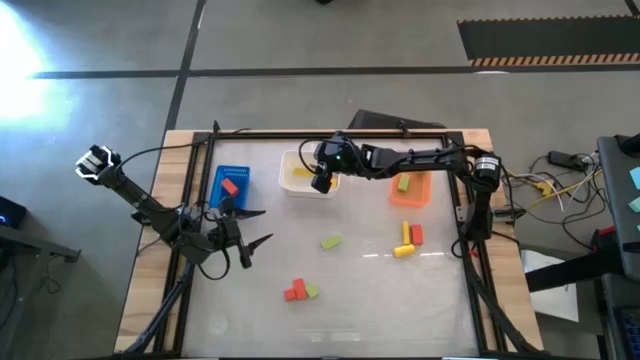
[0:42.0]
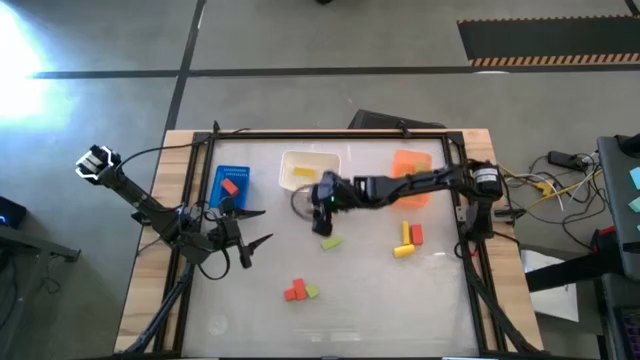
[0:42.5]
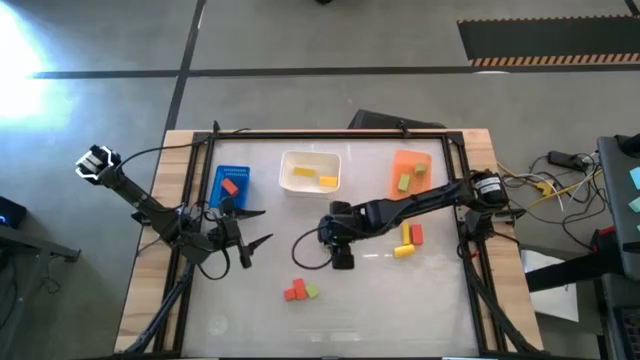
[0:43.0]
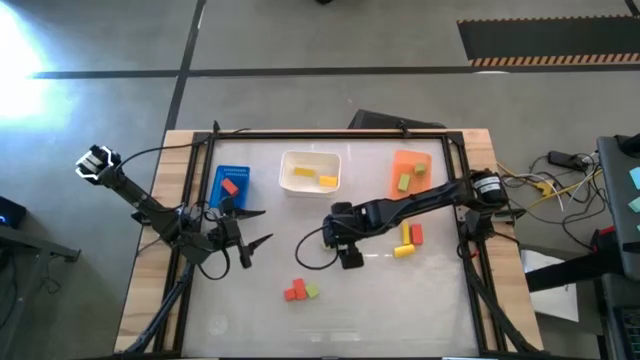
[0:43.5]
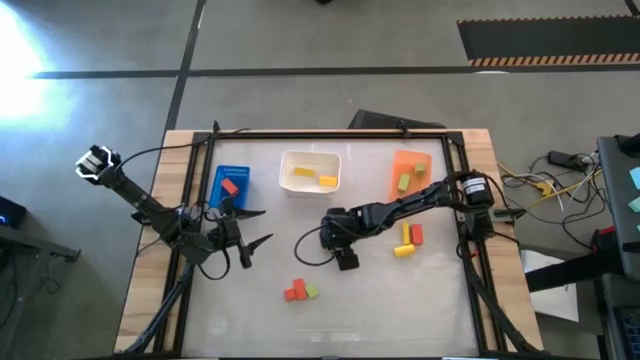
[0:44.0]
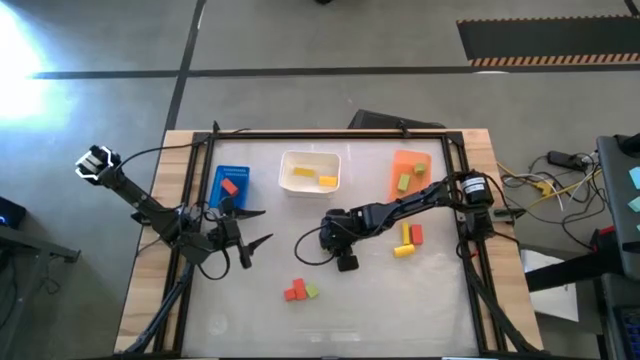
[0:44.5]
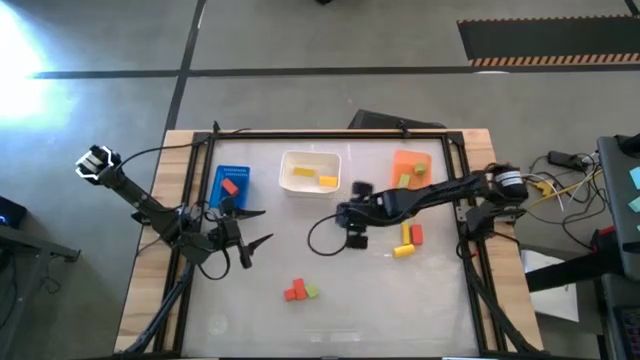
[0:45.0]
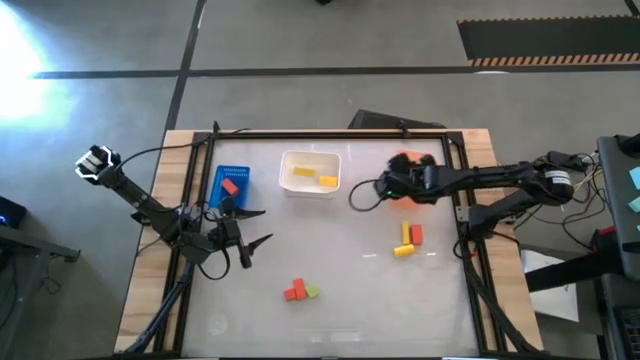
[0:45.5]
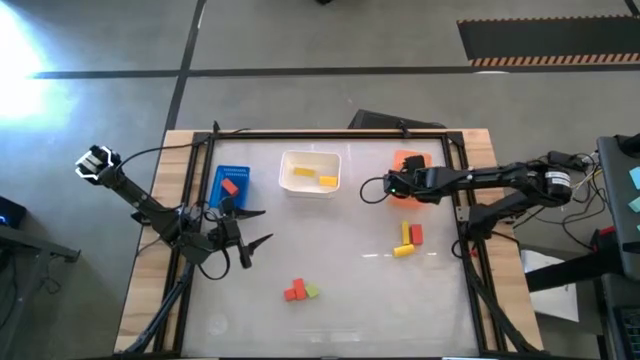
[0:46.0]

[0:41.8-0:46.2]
Task: Sort & place blocks by color
Put the top green block into the orange bin

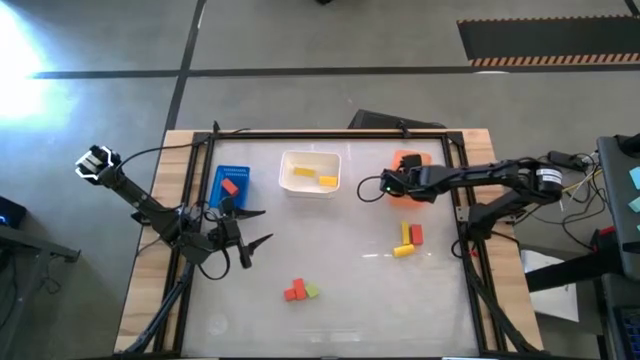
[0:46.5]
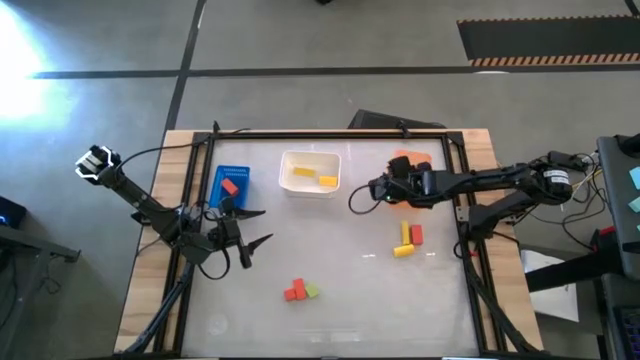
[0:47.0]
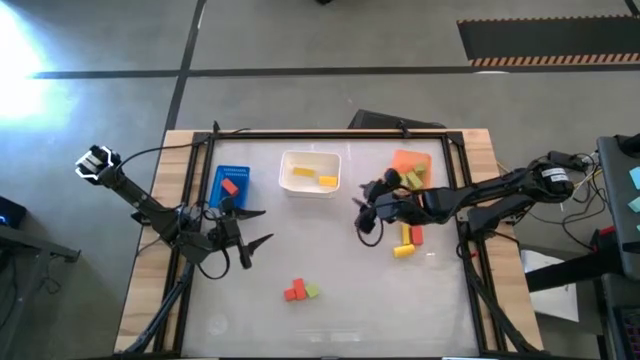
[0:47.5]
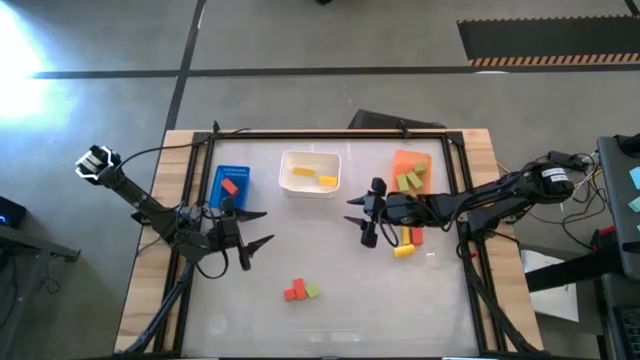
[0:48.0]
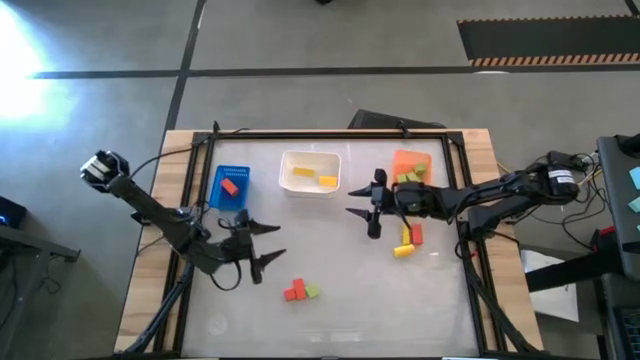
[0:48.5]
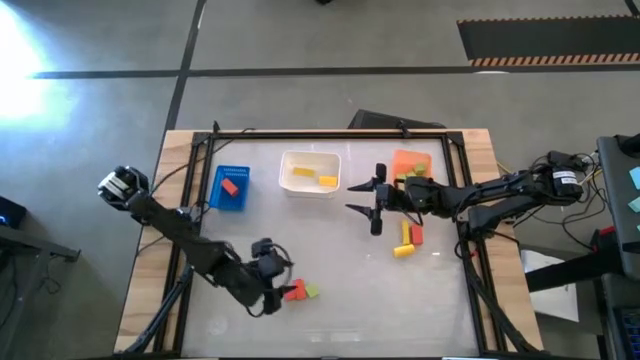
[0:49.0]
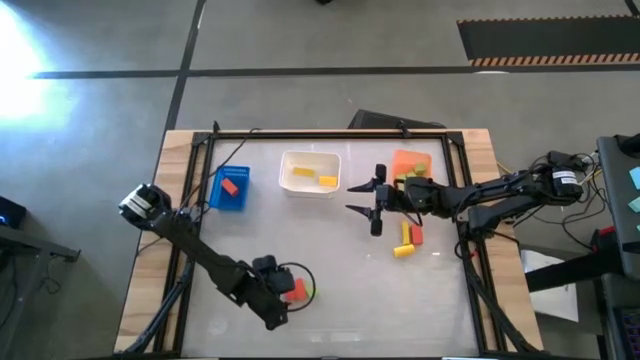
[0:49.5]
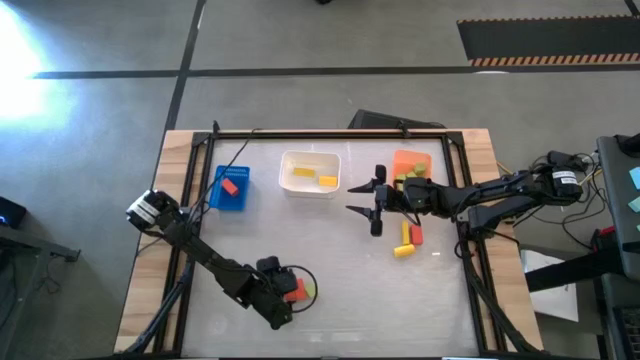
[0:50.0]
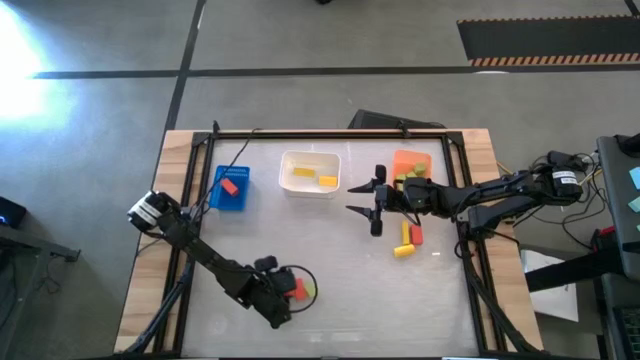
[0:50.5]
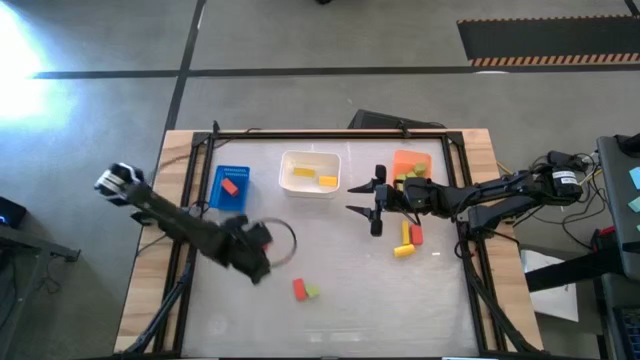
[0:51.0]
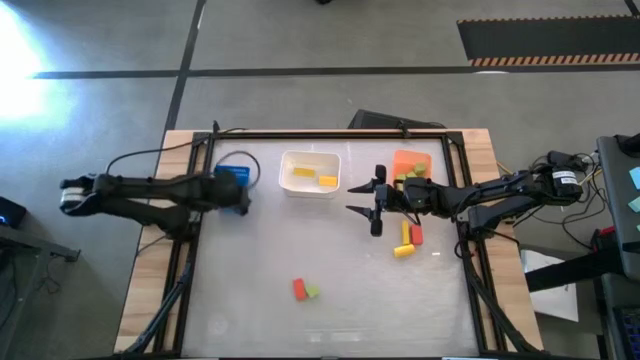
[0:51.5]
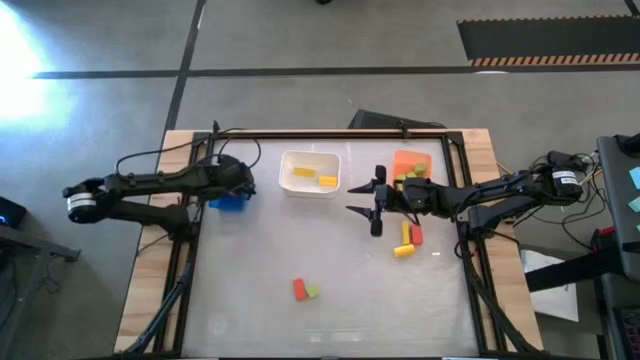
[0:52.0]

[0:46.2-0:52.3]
Put the bottom left orange block into the blue bin

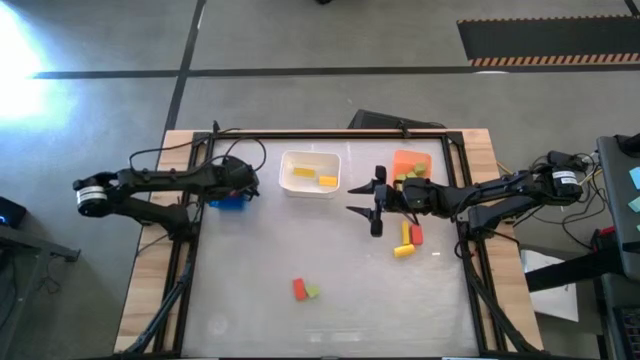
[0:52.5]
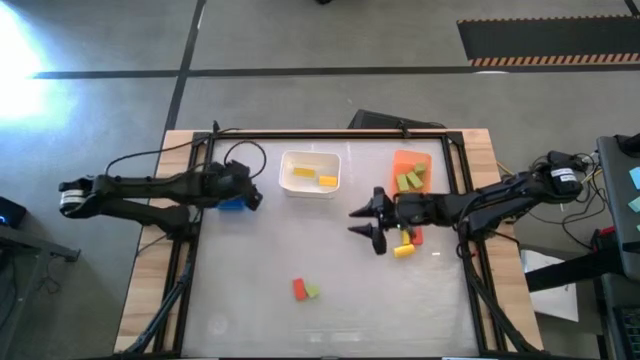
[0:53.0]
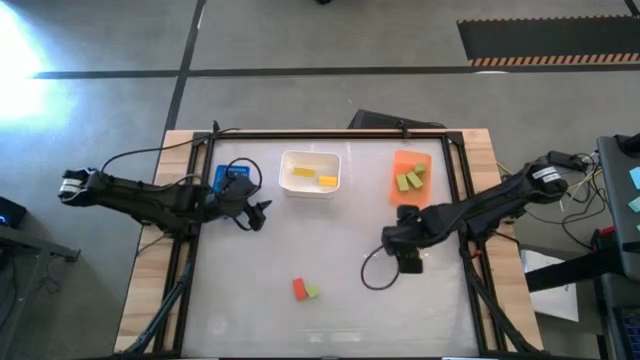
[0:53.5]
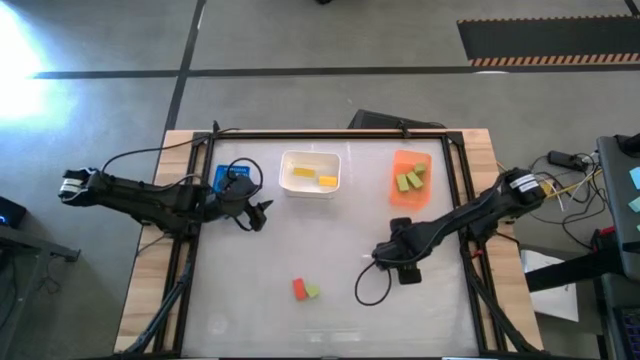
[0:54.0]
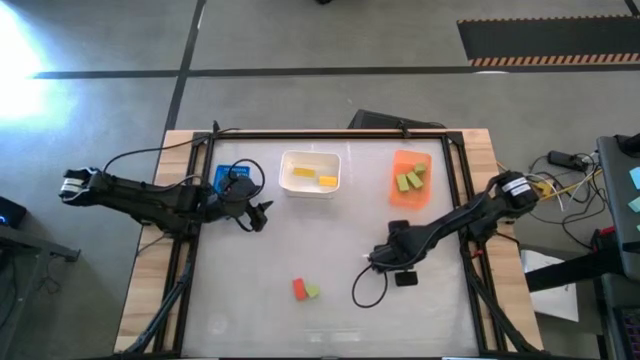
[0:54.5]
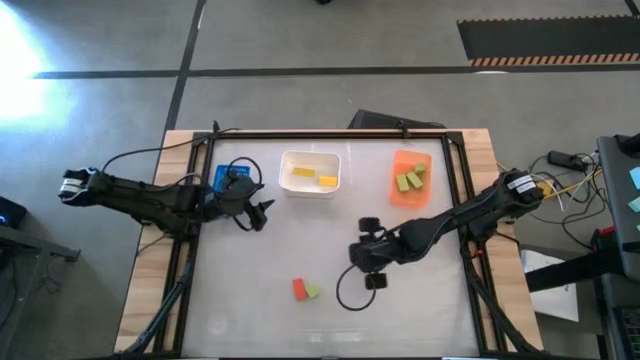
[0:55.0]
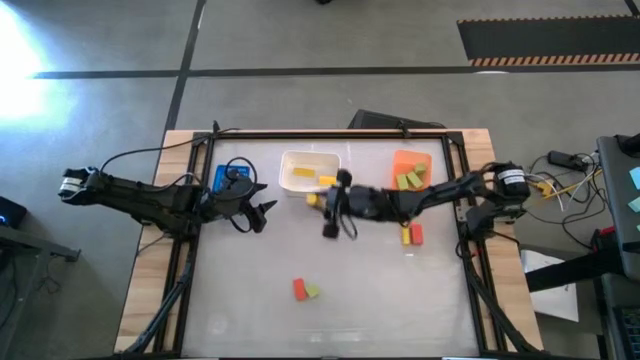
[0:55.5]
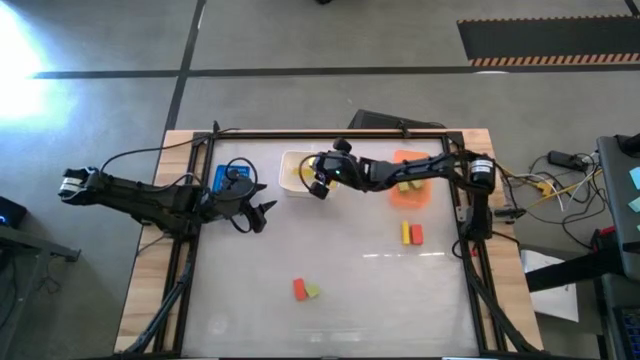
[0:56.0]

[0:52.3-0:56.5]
Put the bottom yellow block into the white bin

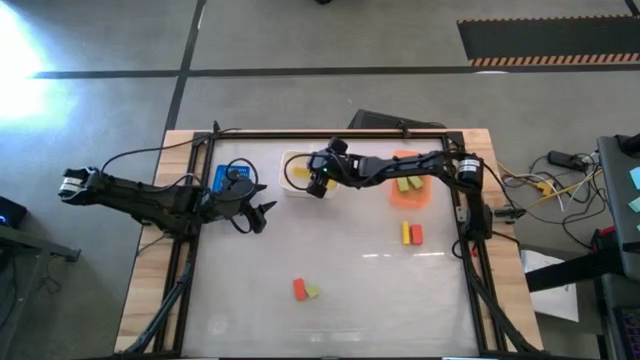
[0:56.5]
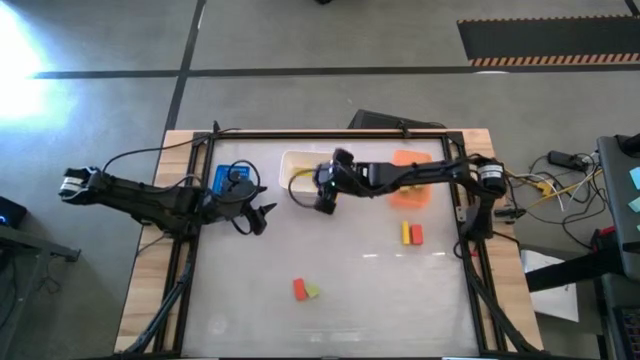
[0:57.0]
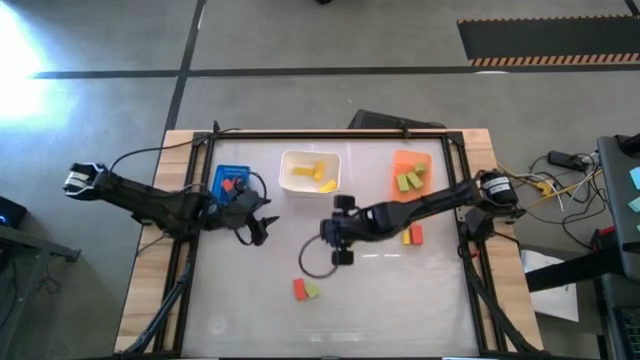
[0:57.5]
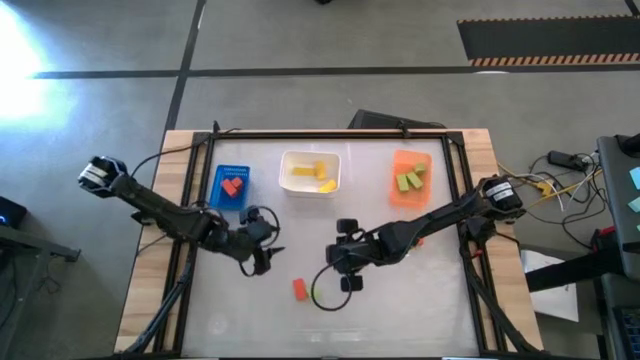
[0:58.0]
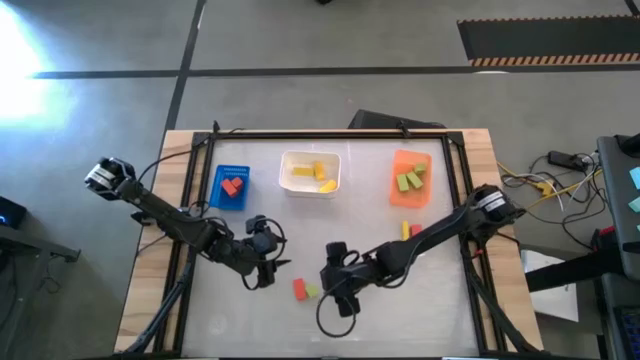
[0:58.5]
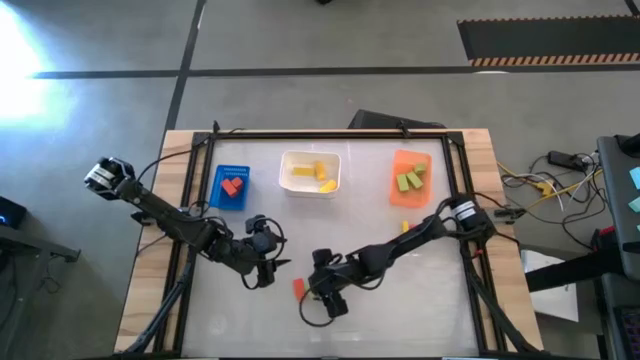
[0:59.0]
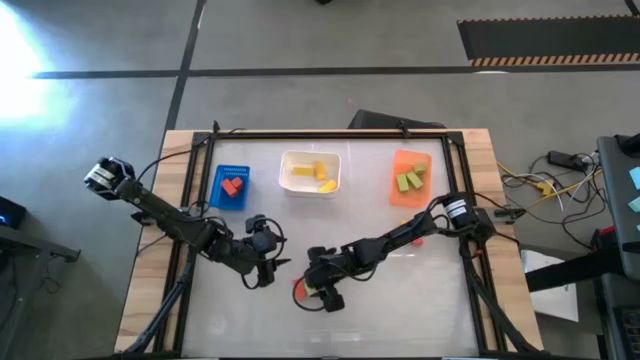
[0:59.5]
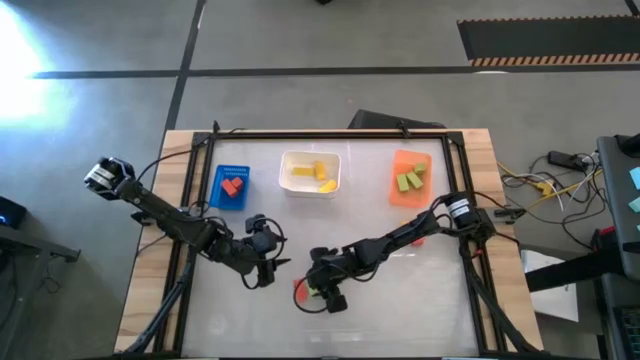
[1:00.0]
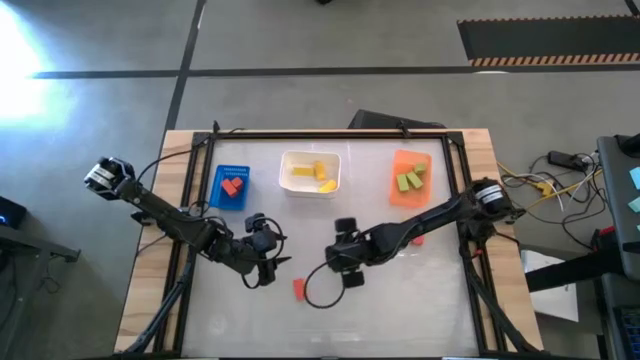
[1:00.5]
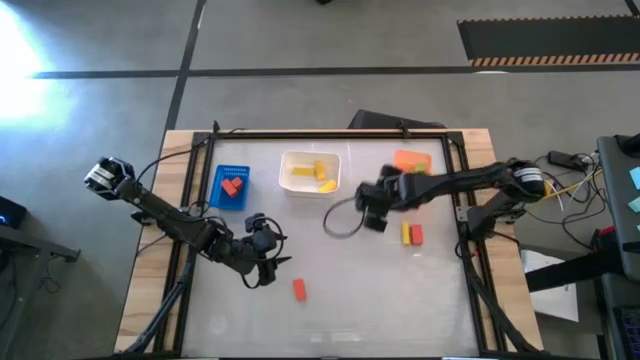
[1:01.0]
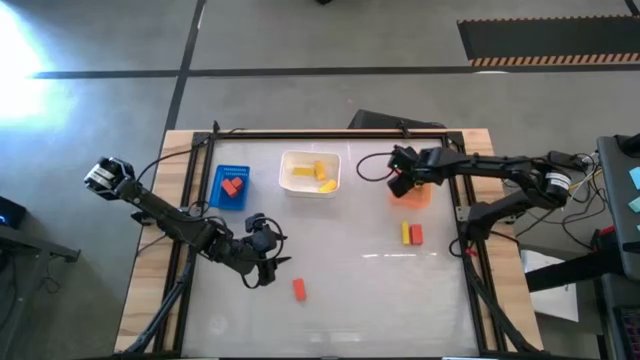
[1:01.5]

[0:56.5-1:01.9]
Put the green block into the orange bin

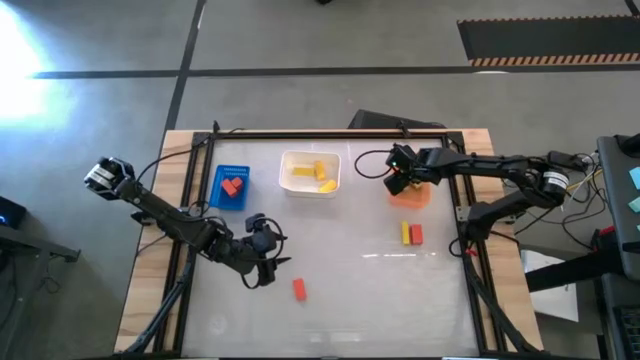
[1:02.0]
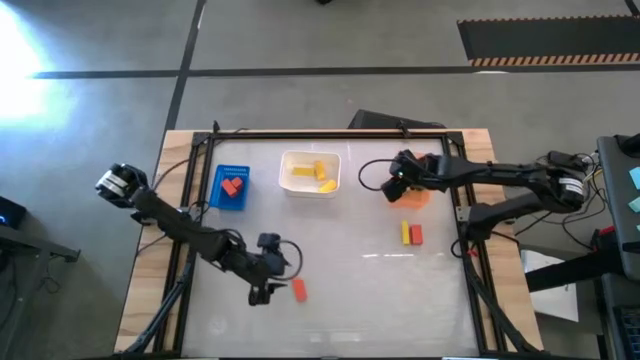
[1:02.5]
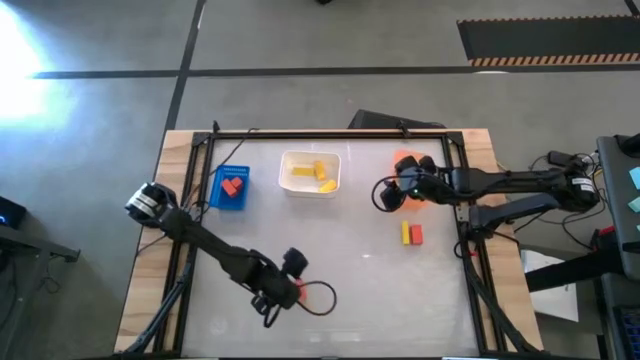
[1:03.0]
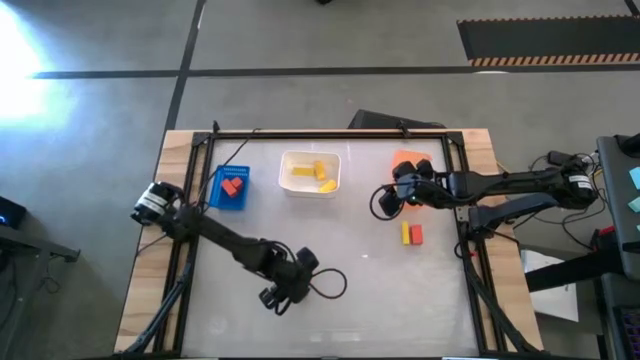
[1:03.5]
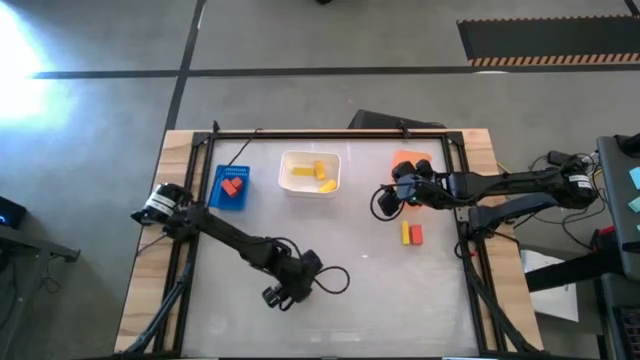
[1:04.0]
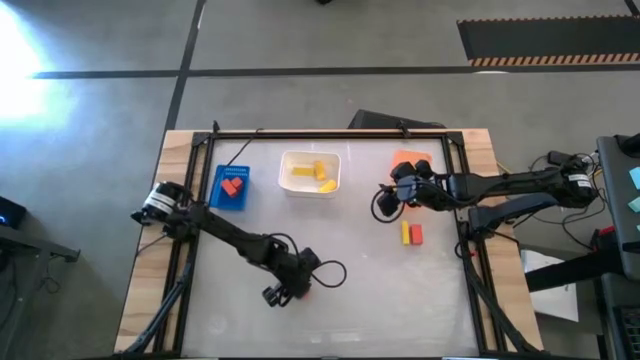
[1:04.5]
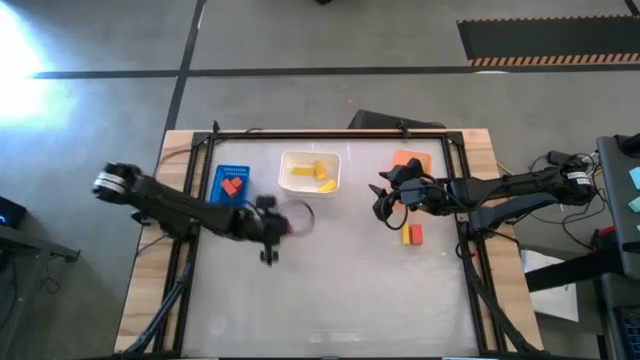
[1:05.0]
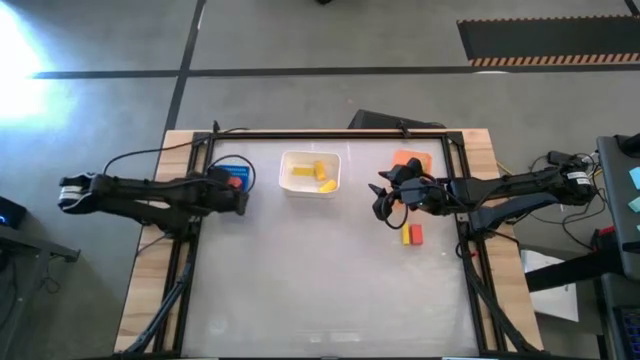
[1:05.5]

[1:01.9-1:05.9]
Put the bottom orange block into the blue basket
